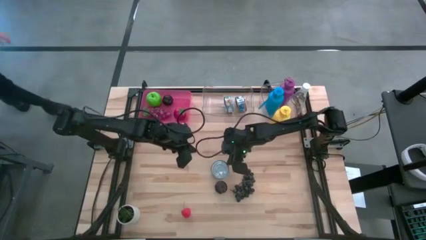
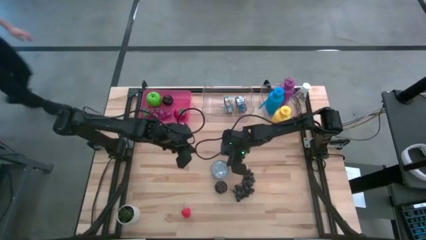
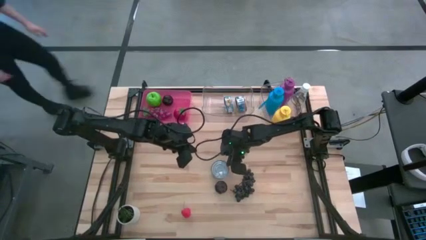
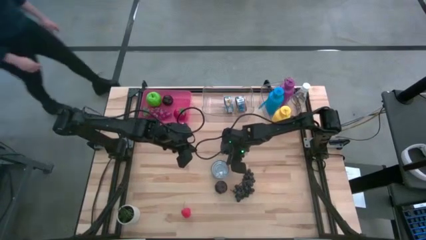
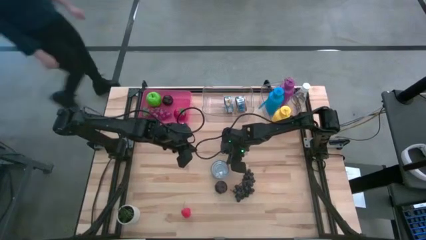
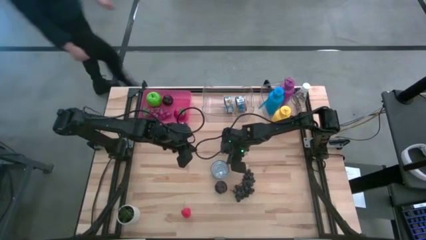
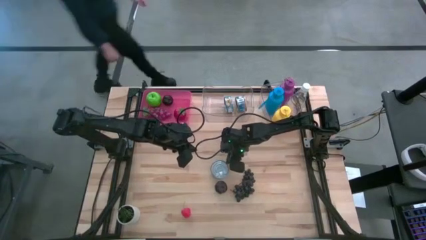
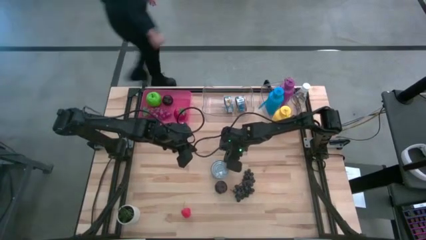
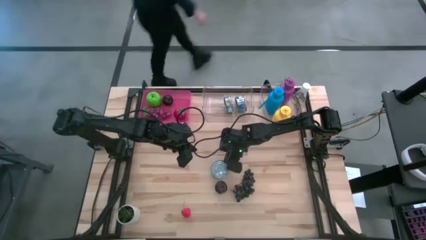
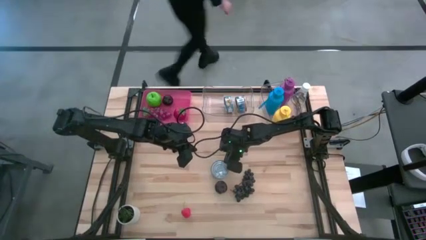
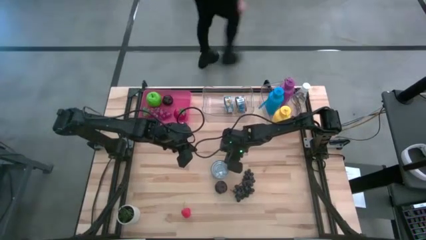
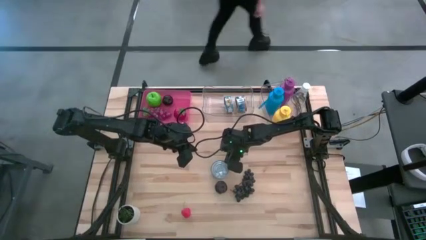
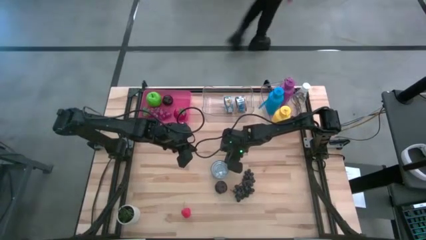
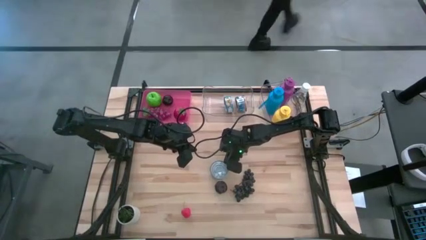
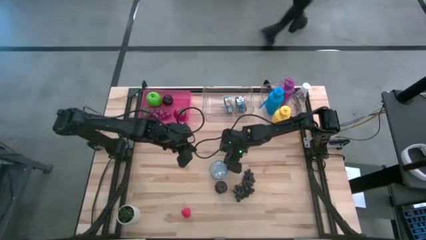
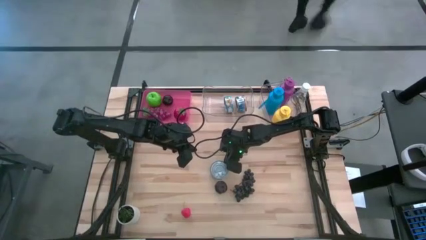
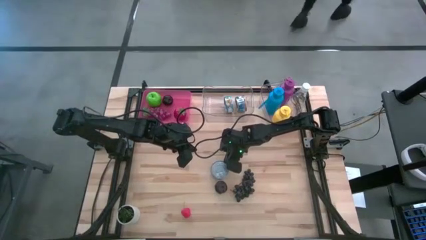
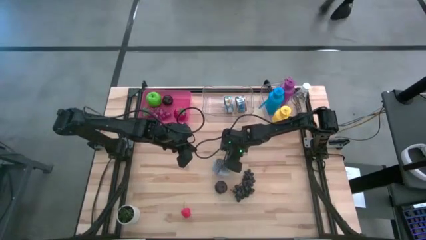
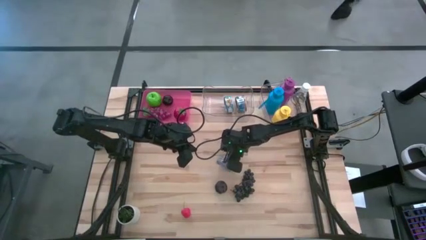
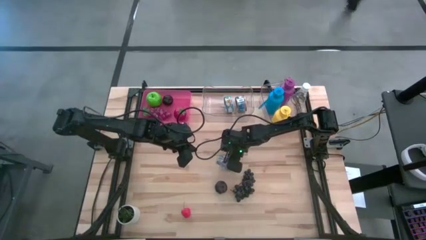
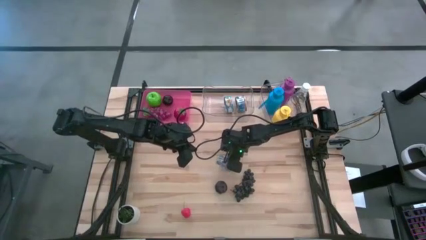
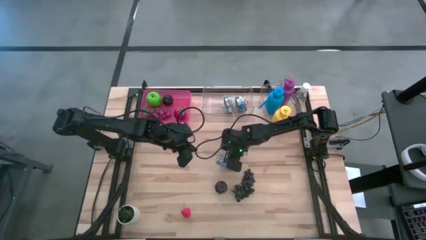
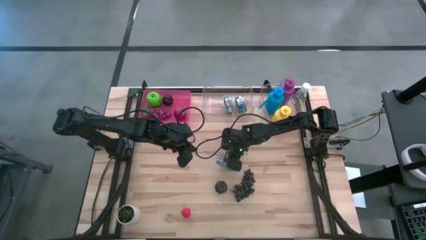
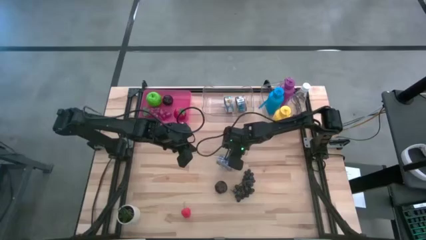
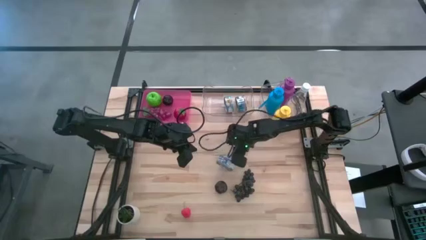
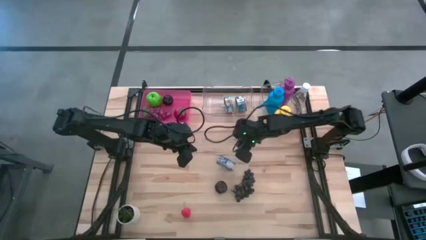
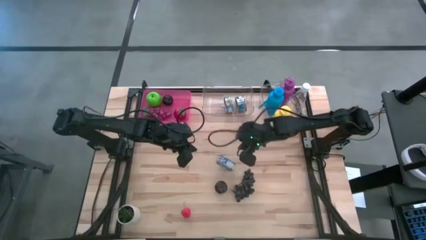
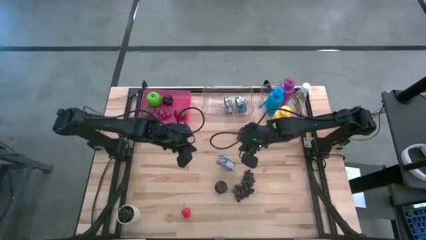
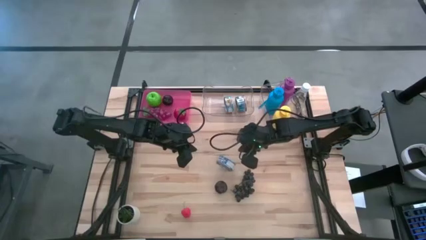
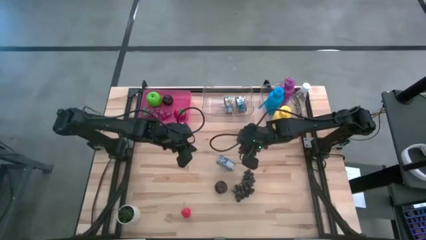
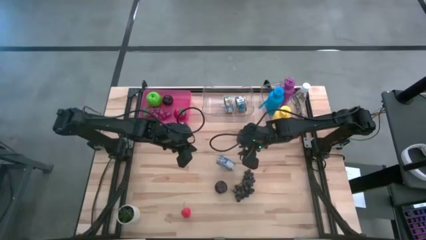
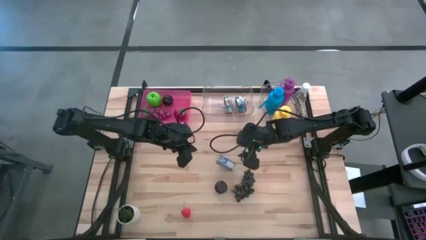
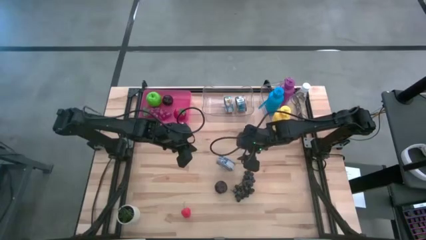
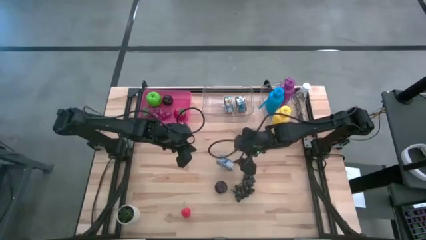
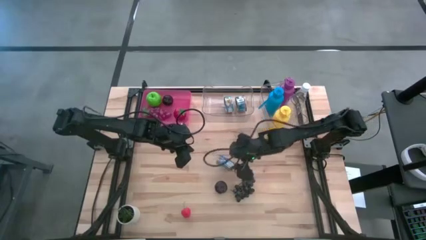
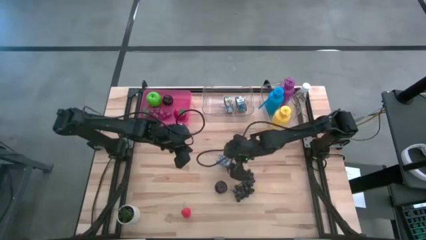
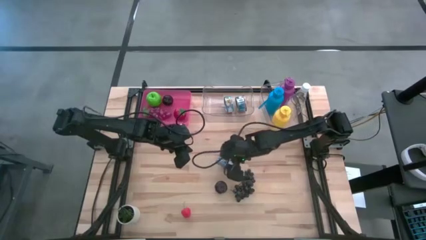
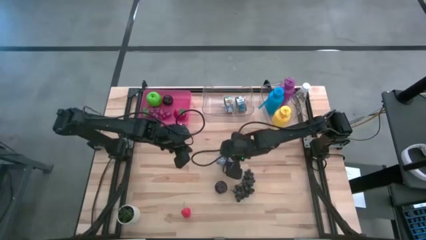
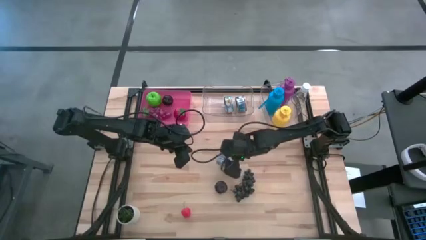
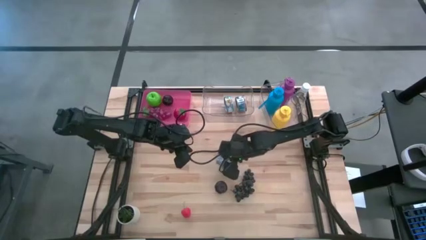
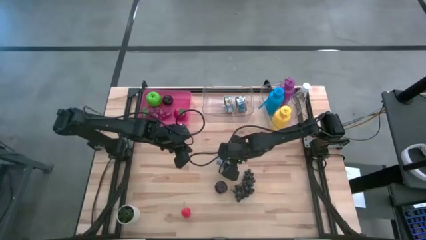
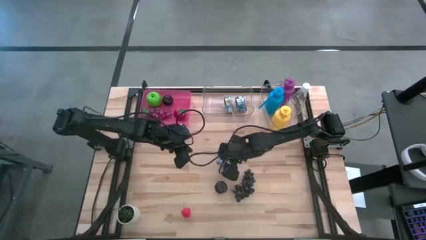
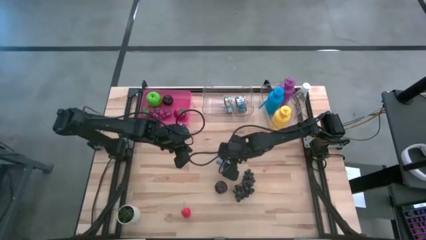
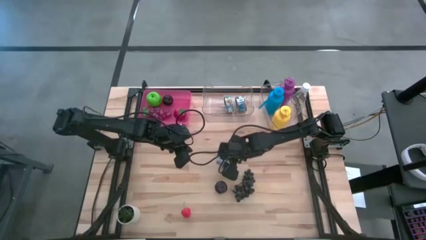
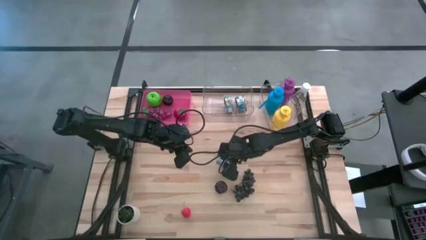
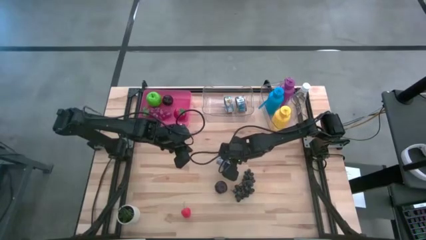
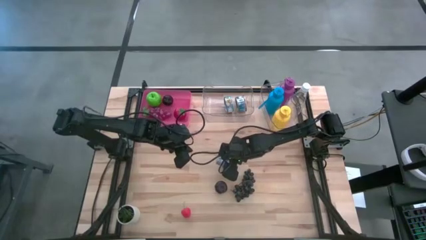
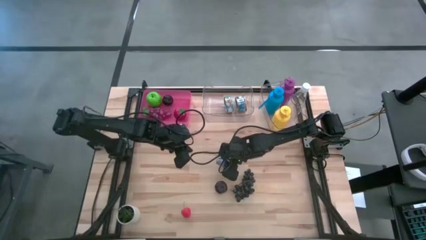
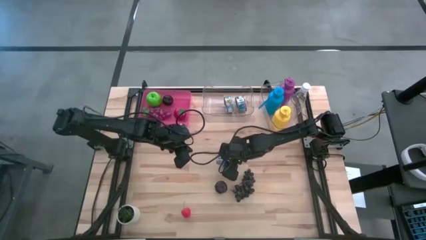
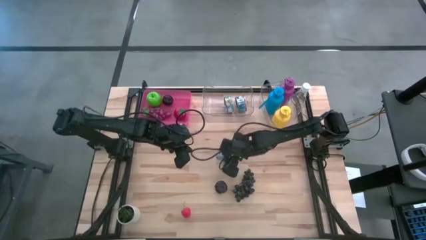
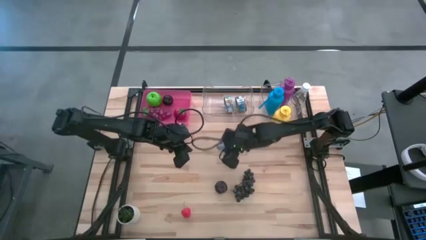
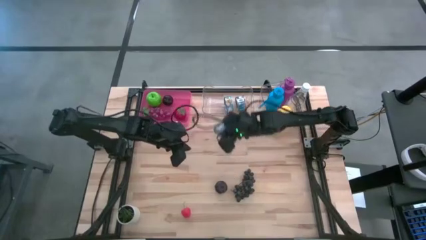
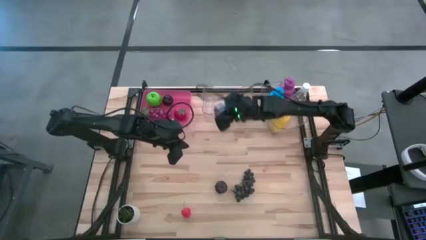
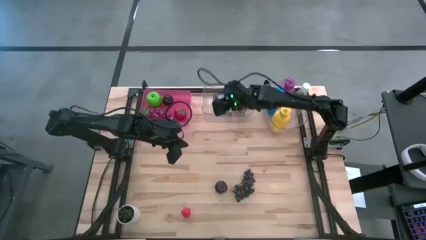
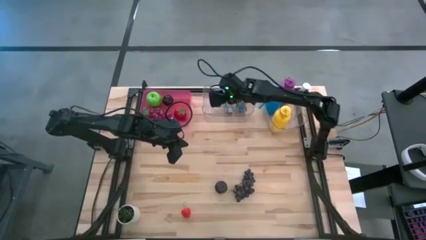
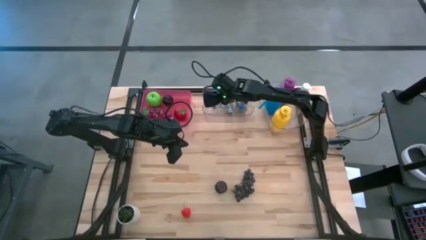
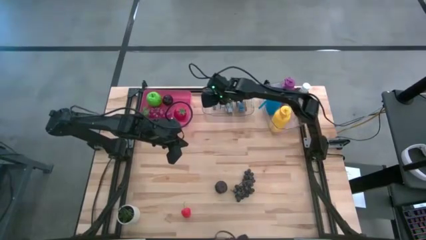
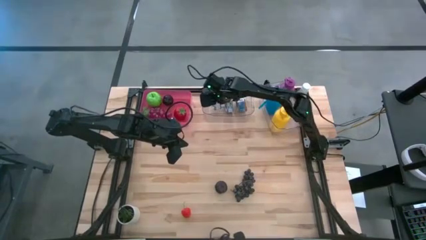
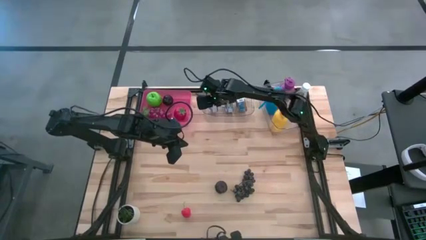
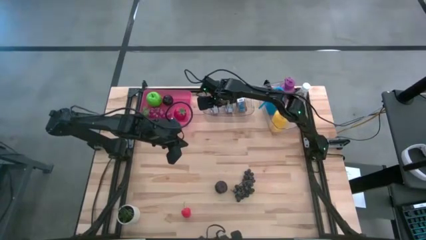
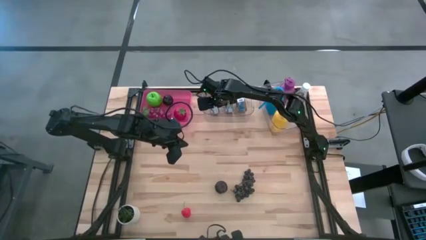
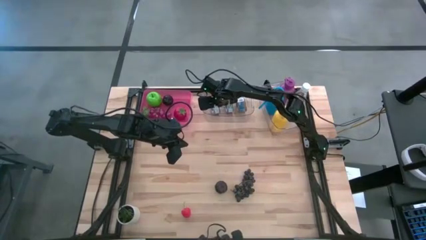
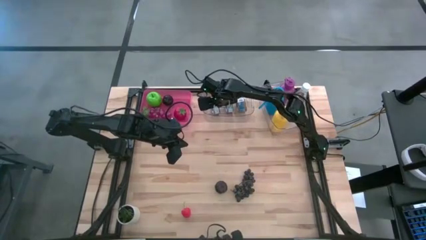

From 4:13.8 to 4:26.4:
Task: Pick & Place Food Item
Put the blue tuna can into the left transparent bin

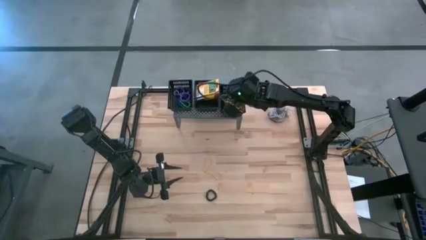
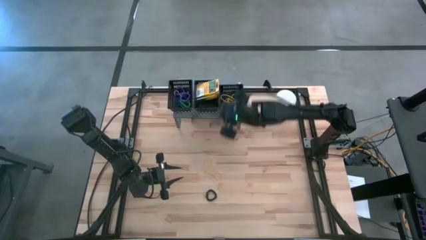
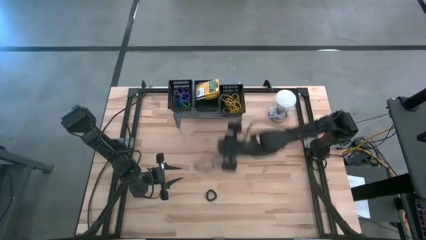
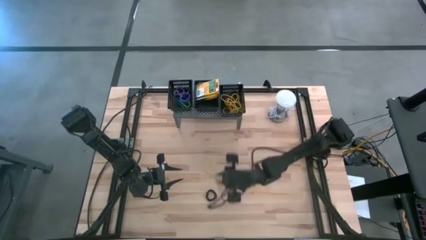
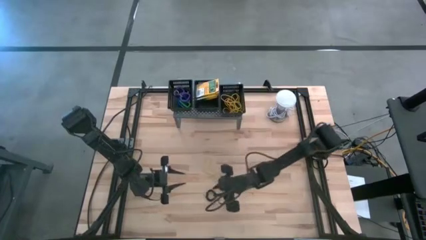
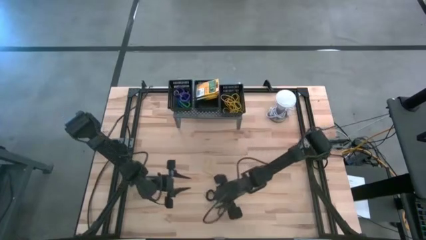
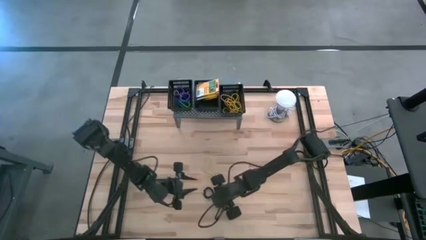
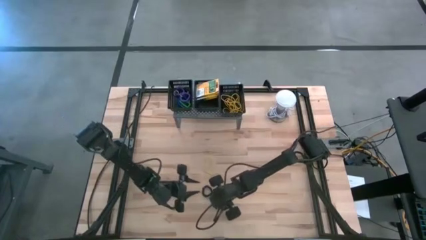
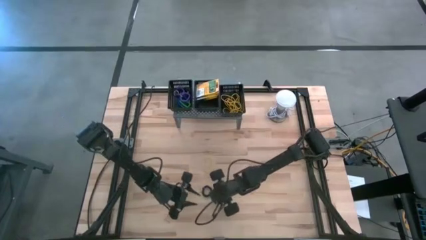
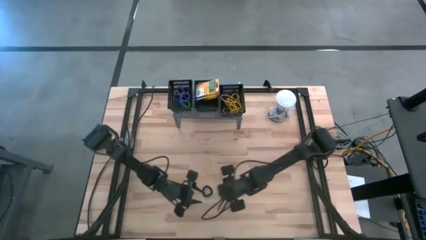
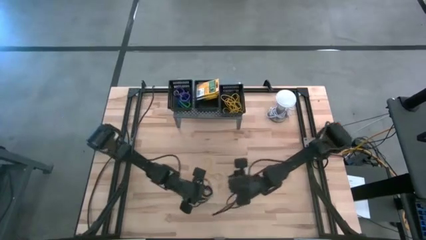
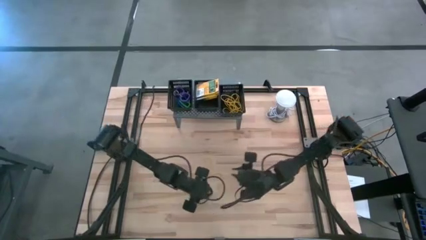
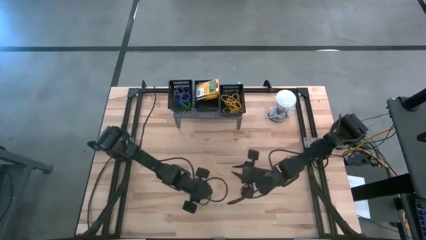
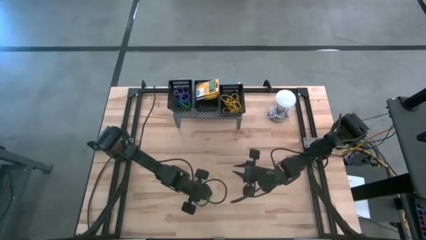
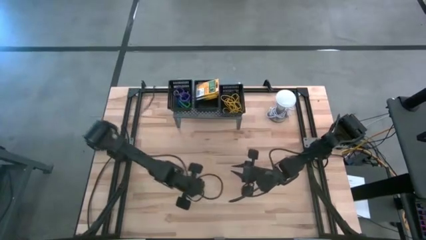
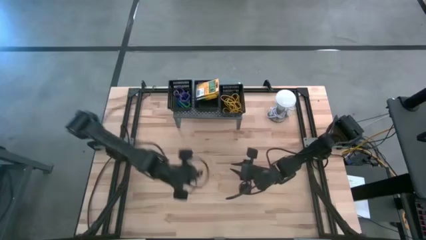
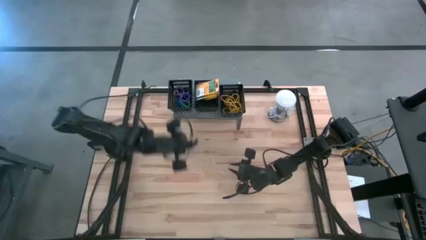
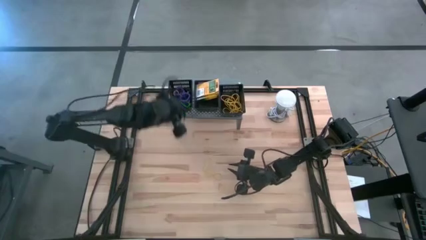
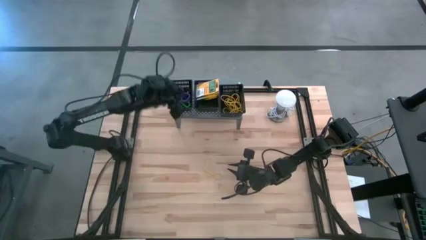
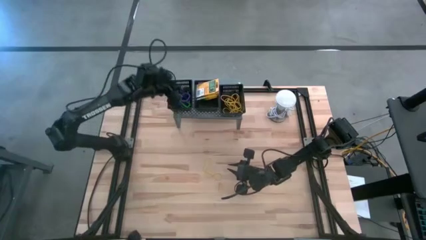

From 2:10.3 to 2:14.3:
Task: Pick & Place Office Desk Supplies
Put the black spring keychain into the left black bin on the shelf

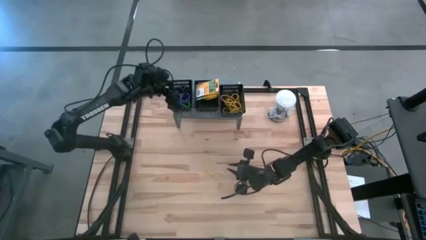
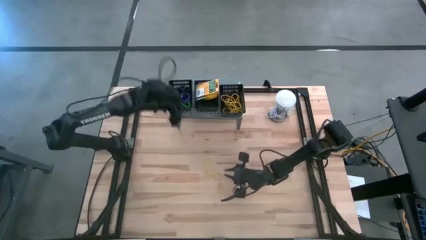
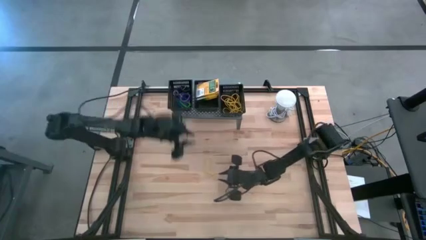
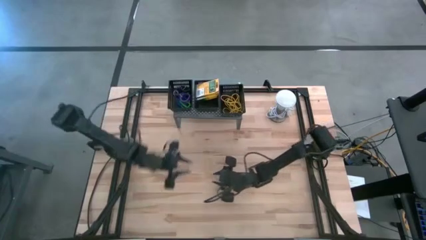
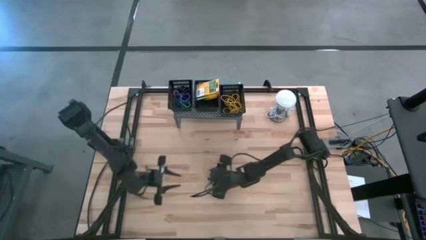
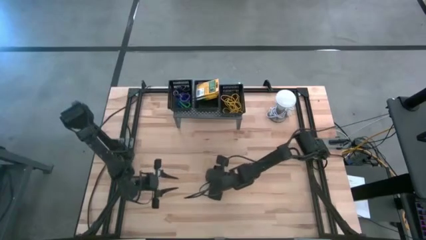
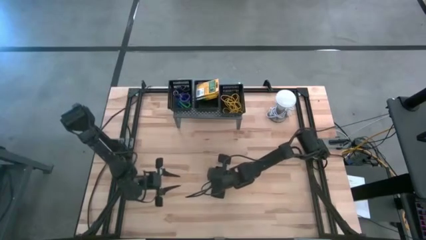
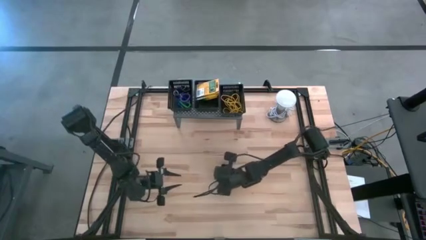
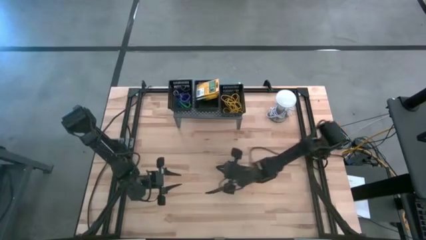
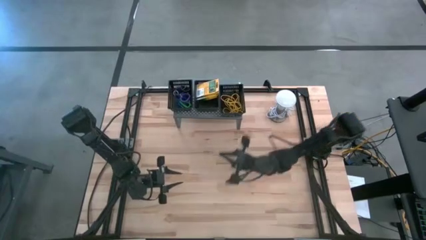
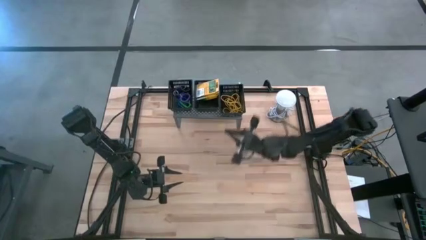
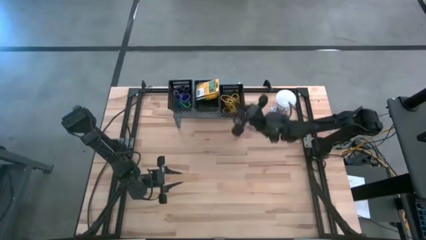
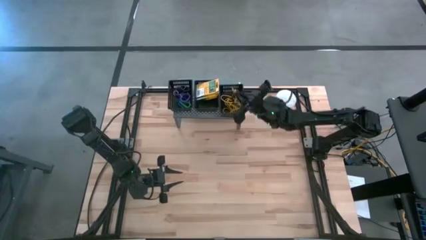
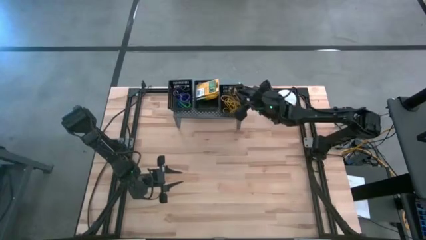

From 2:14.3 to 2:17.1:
Put the yellow rubber band into the right black bin on the shelf
